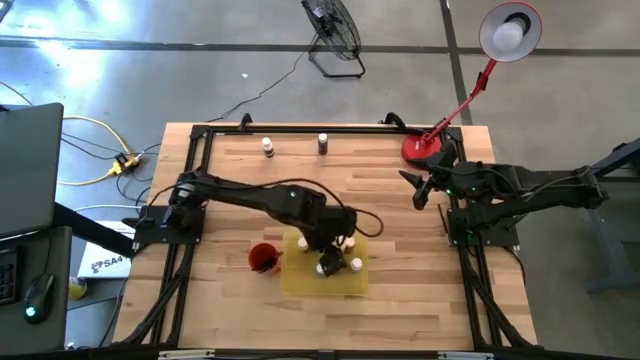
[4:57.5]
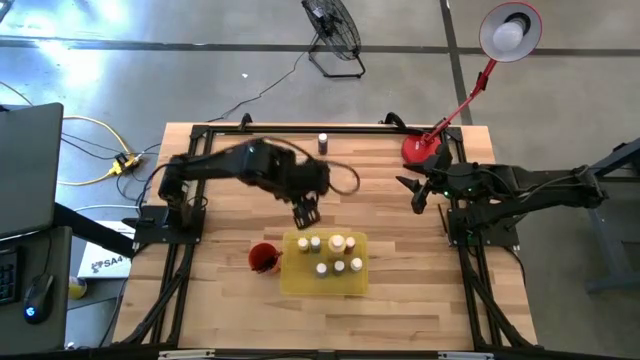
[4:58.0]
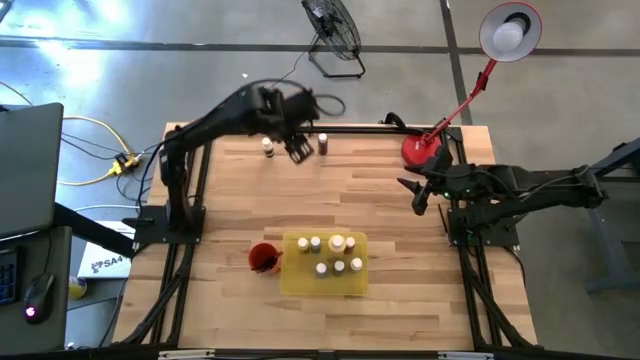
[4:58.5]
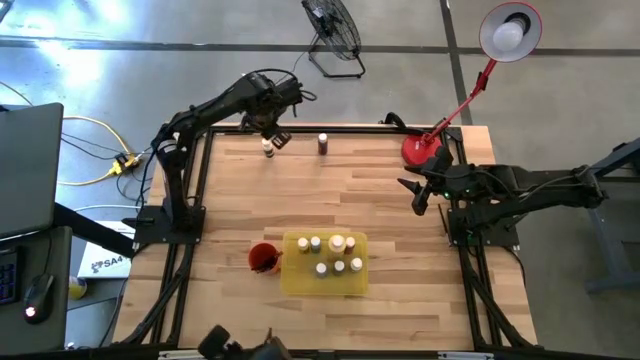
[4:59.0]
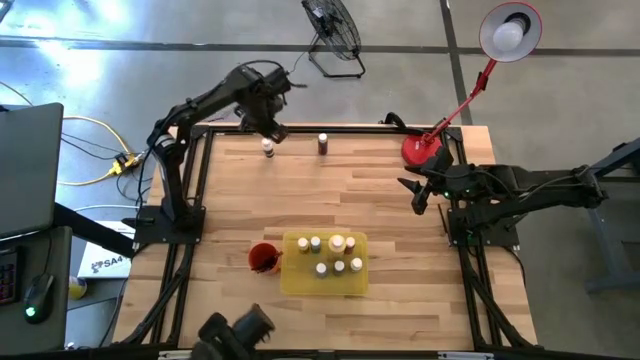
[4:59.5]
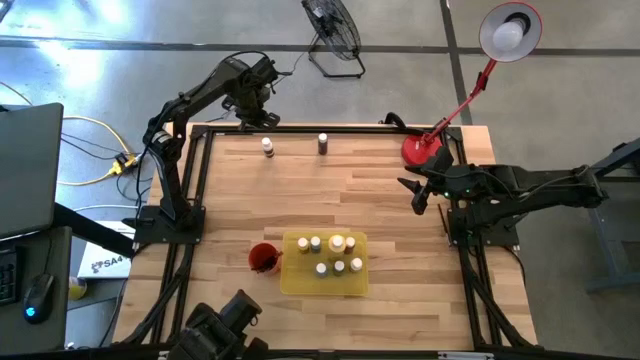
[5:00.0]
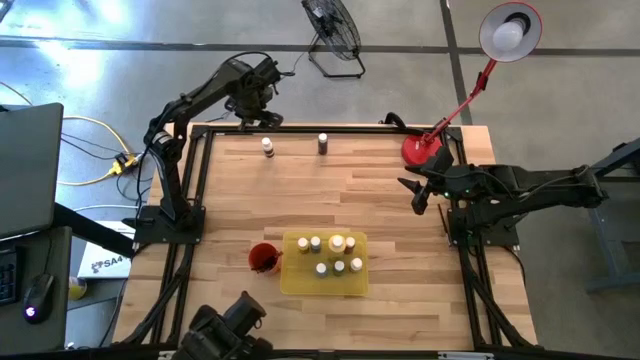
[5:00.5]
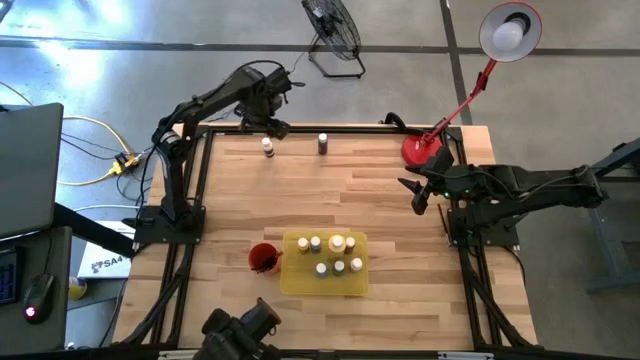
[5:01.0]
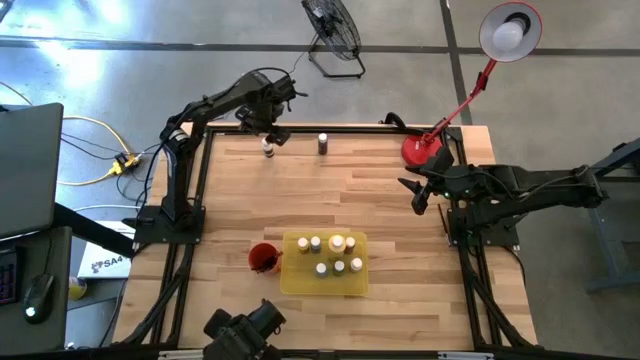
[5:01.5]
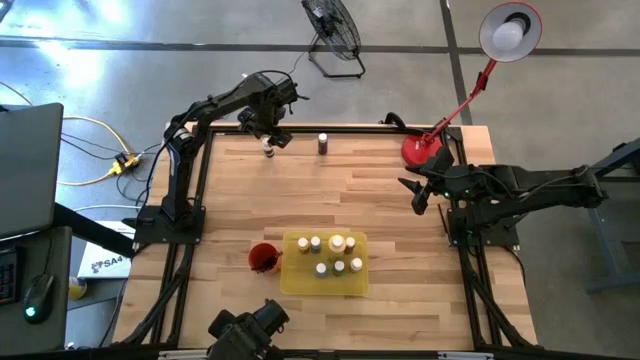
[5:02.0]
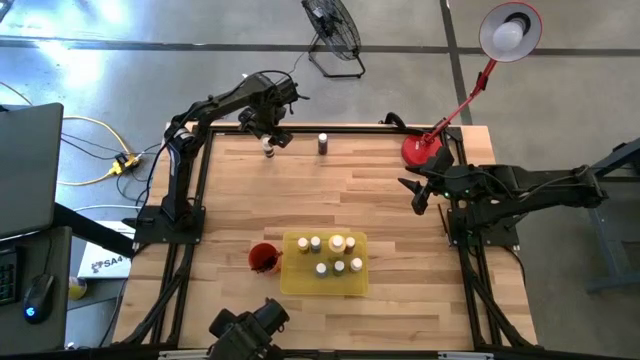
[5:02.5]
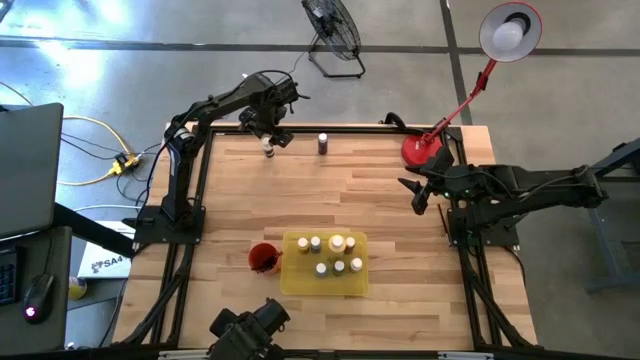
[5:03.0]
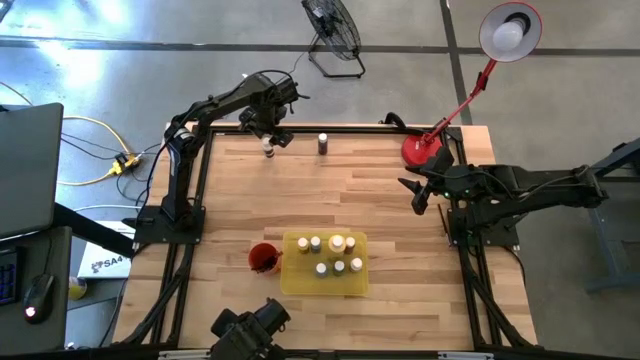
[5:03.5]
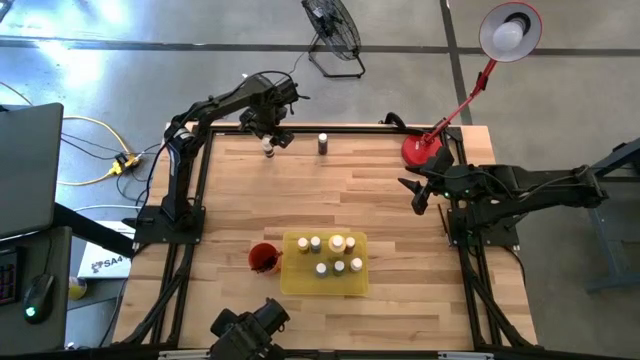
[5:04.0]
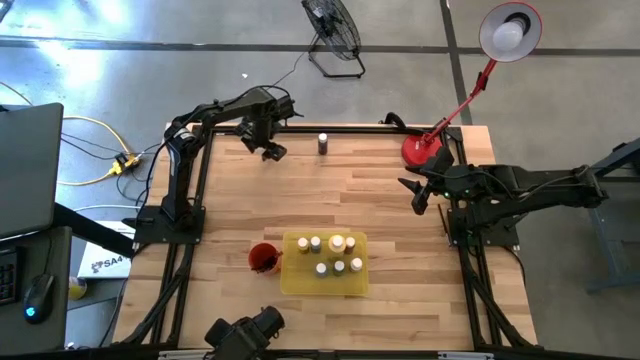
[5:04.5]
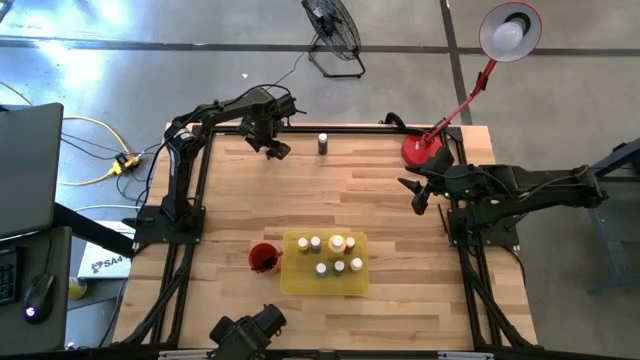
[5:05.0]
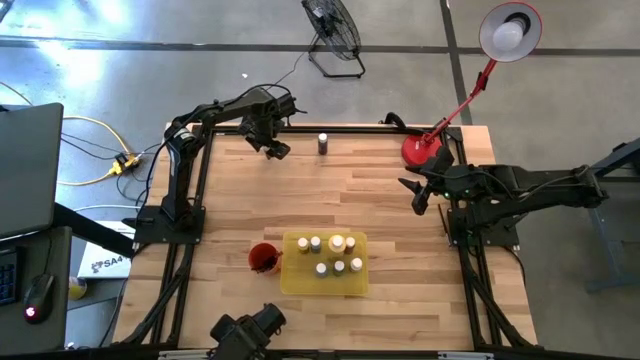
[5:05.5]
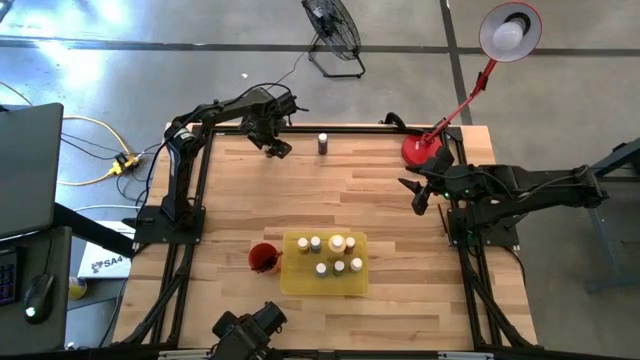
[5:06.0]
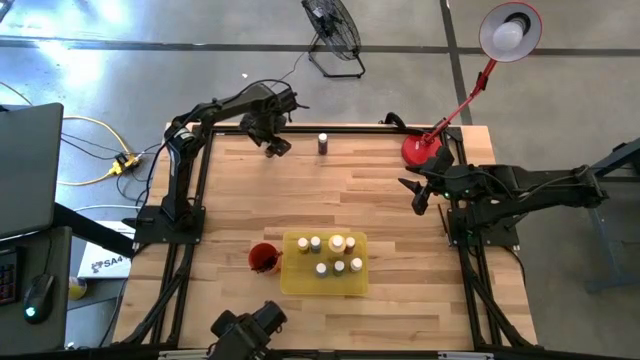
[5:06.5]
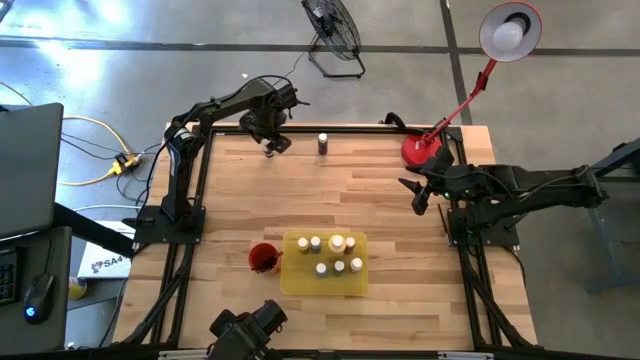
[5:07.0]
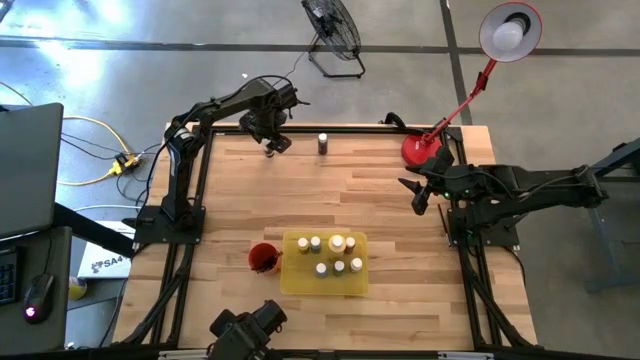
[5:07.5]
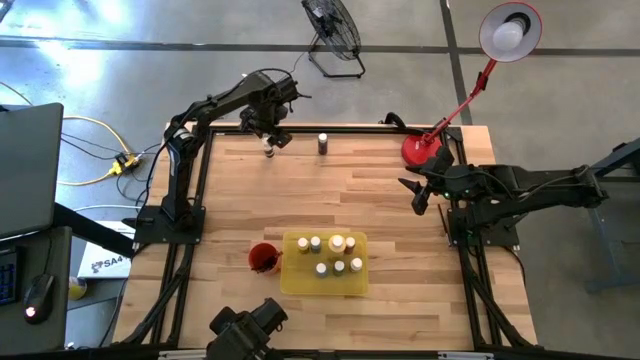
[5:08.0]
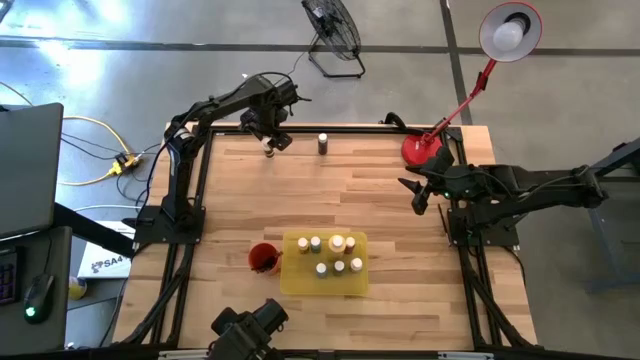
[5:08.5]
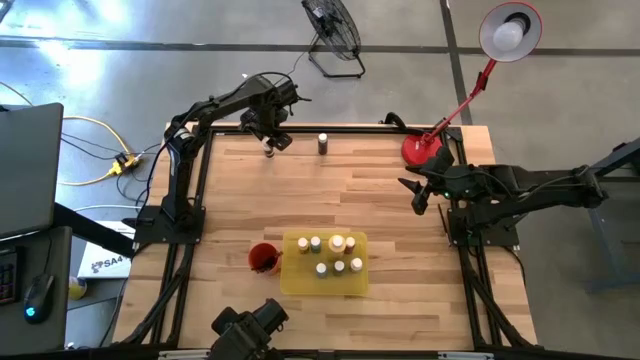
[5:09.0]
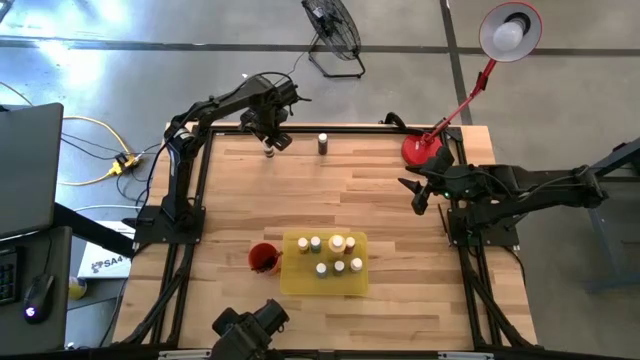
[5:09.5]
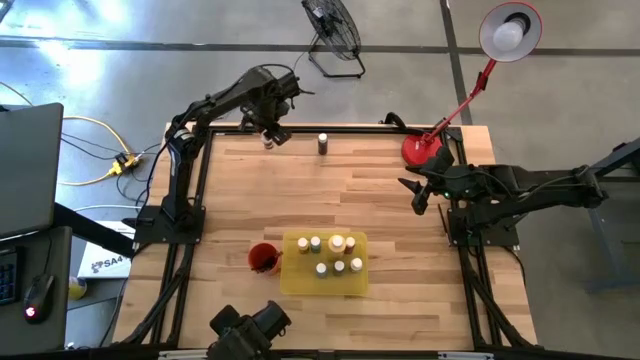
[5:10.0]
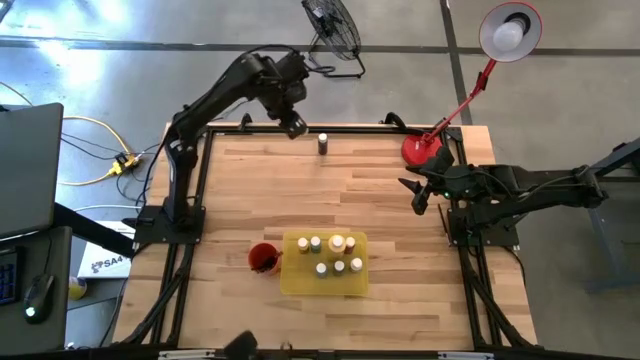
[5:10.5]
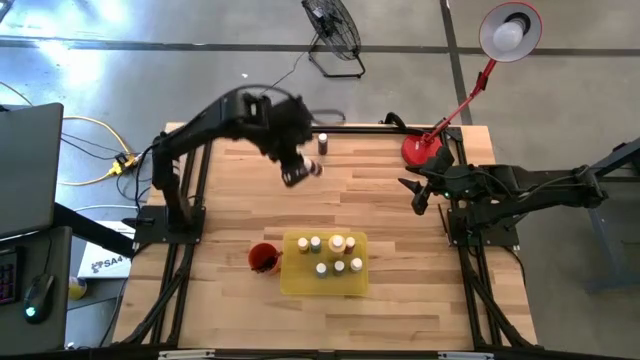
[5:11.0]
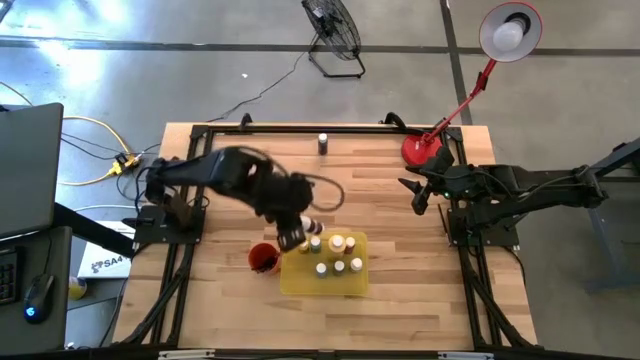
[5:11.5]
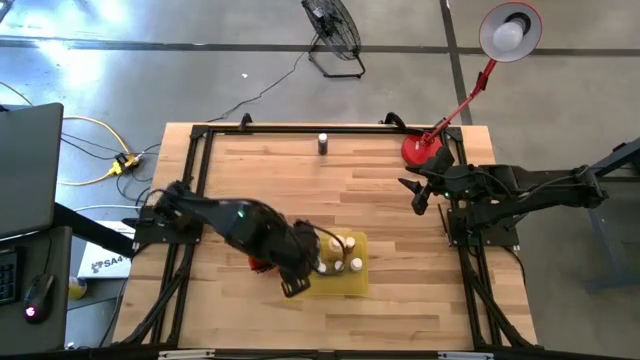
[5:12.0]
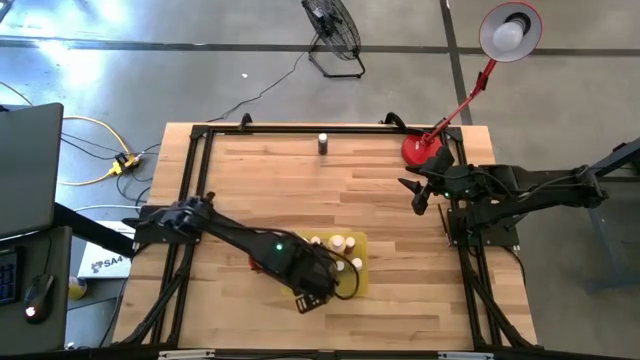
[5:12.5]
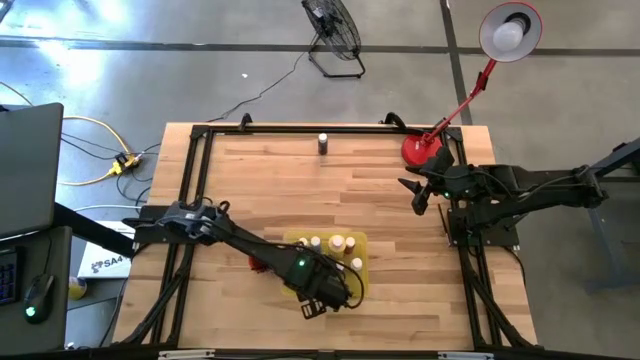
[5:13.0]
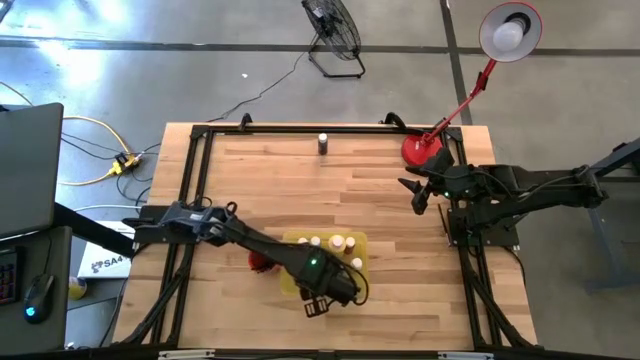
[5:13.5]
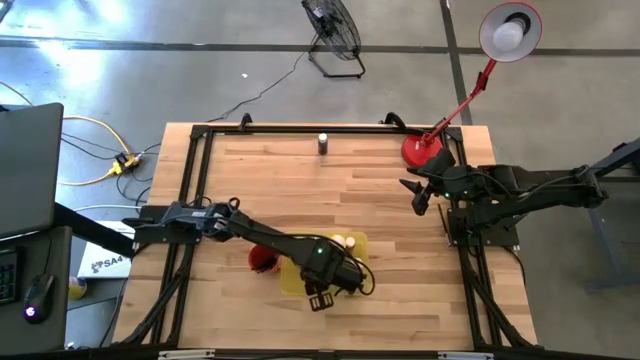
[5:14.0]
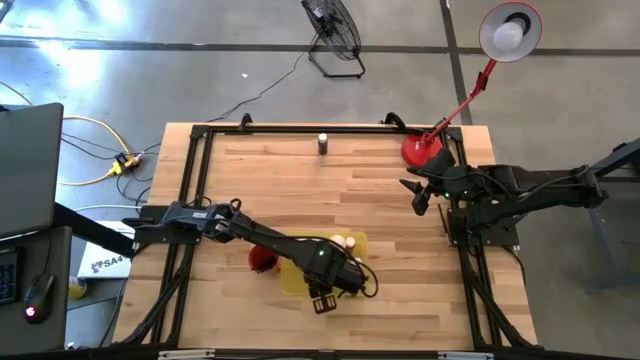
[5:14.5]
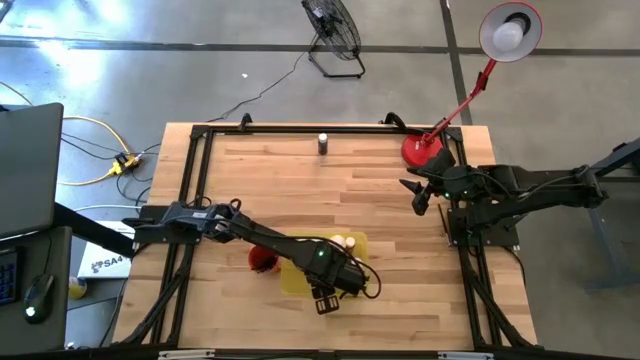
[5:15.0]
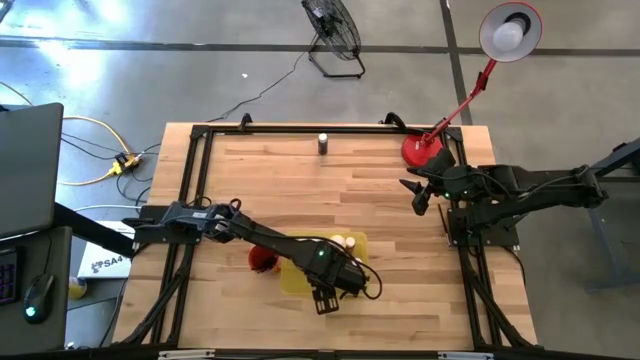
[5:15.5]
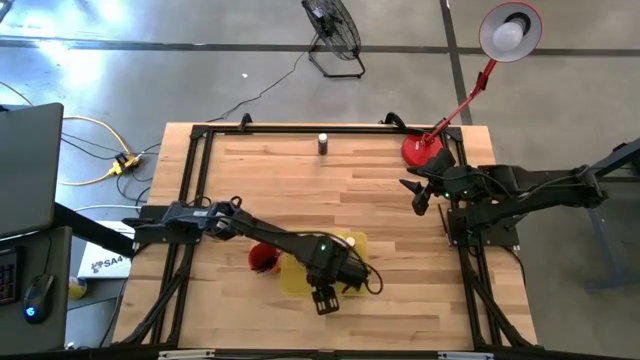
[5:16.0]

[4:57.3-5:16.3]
Task: Pick & Place Paint Supplies
Put the white paint bottle into the yellow bin
